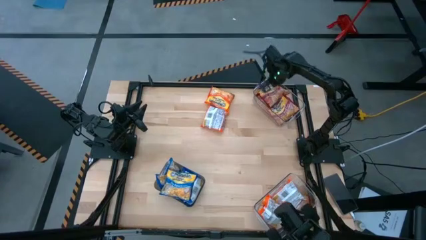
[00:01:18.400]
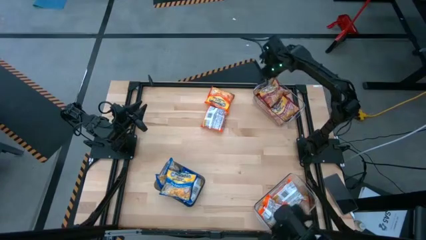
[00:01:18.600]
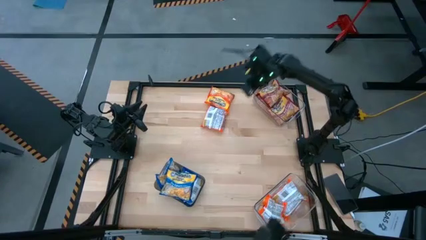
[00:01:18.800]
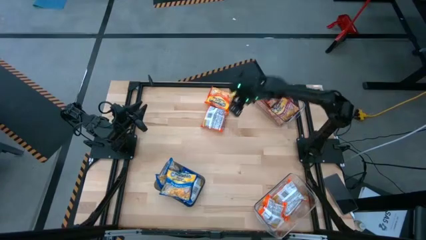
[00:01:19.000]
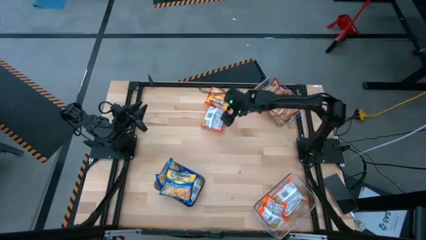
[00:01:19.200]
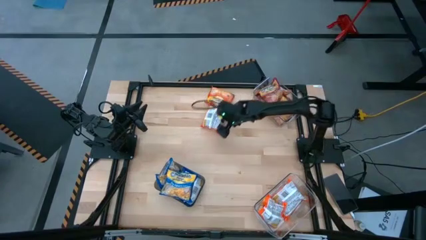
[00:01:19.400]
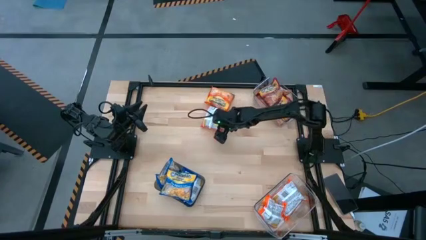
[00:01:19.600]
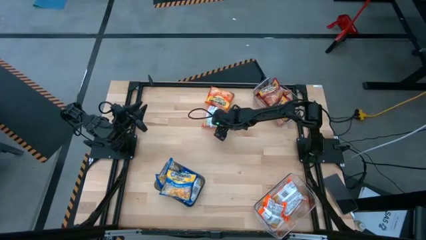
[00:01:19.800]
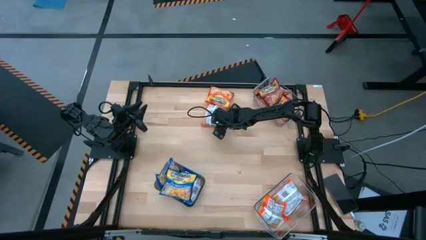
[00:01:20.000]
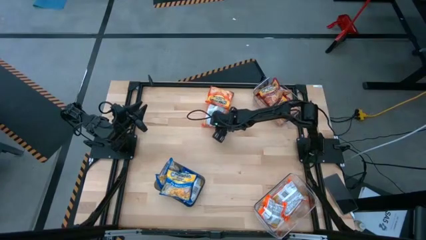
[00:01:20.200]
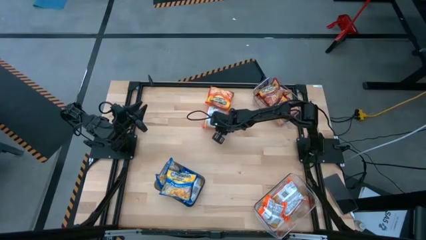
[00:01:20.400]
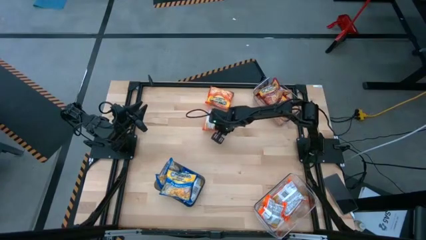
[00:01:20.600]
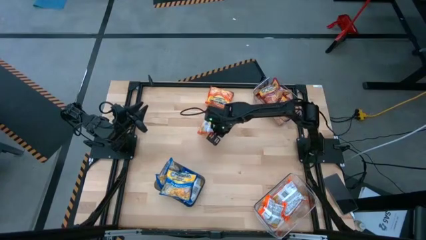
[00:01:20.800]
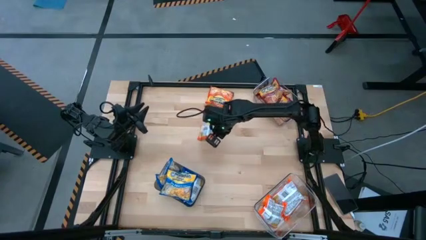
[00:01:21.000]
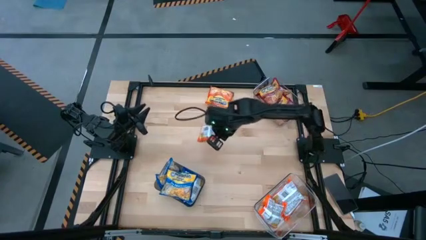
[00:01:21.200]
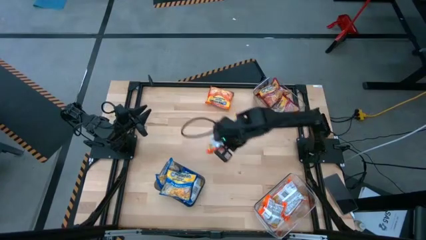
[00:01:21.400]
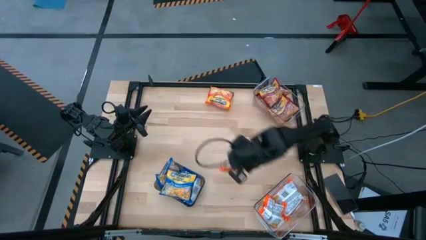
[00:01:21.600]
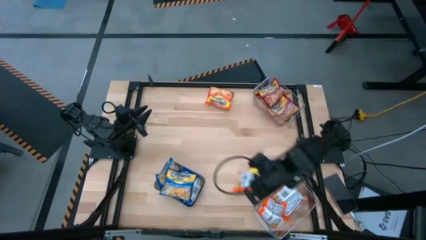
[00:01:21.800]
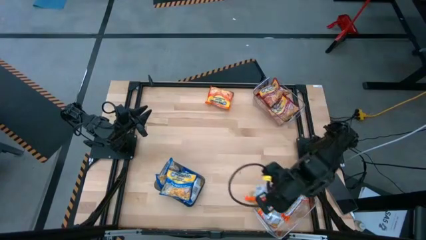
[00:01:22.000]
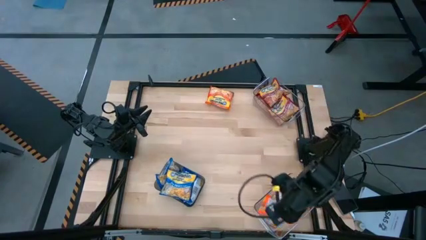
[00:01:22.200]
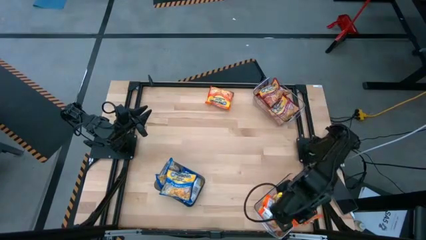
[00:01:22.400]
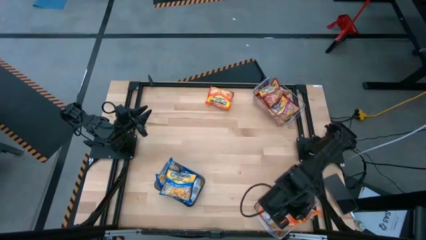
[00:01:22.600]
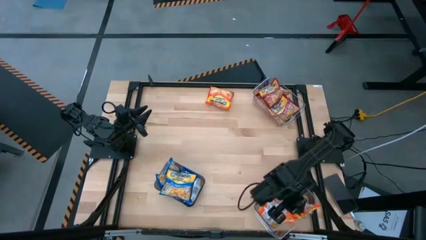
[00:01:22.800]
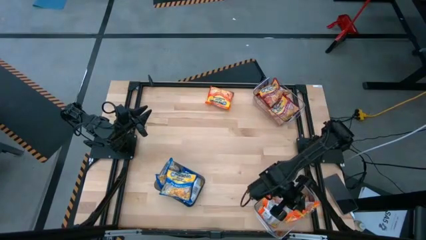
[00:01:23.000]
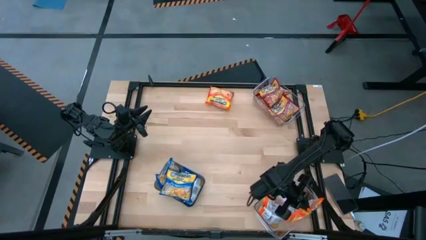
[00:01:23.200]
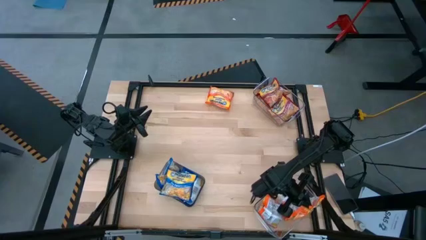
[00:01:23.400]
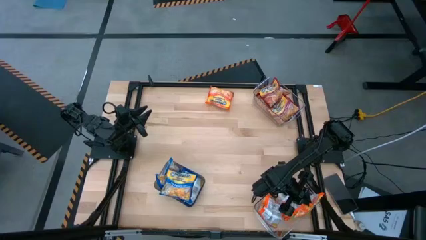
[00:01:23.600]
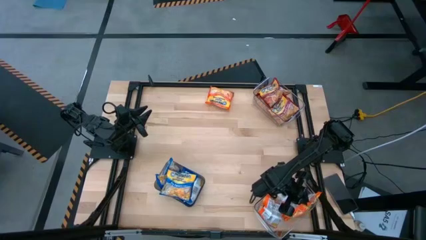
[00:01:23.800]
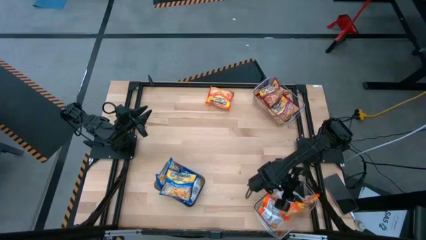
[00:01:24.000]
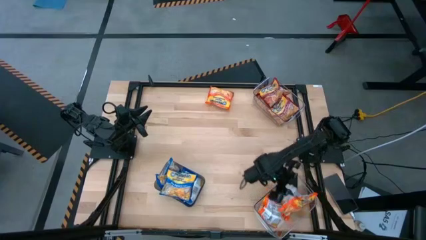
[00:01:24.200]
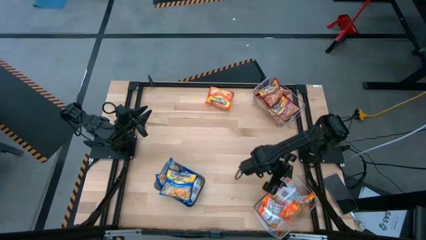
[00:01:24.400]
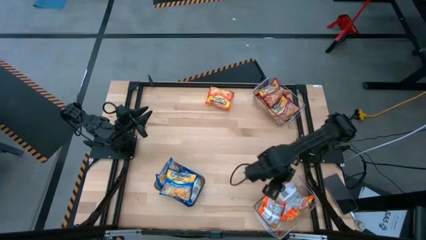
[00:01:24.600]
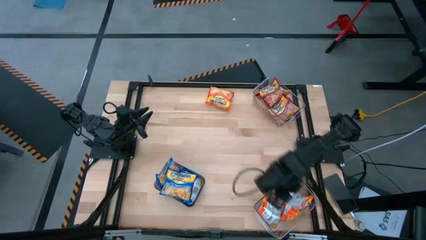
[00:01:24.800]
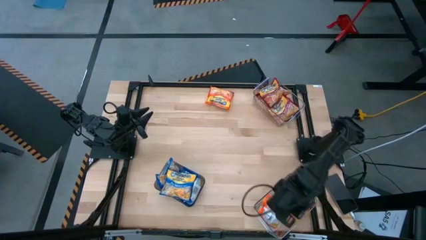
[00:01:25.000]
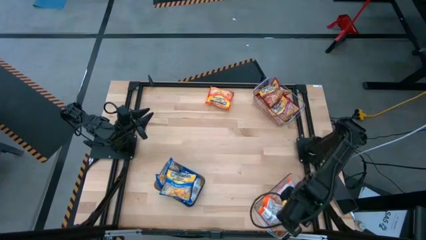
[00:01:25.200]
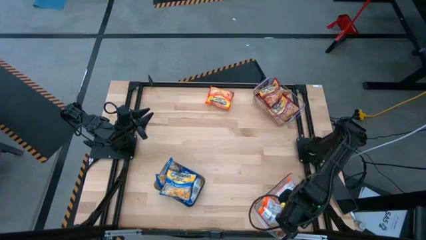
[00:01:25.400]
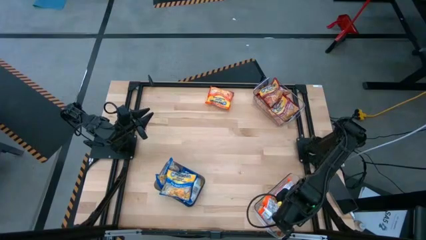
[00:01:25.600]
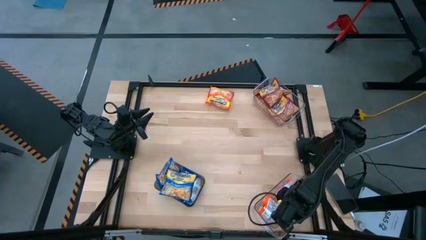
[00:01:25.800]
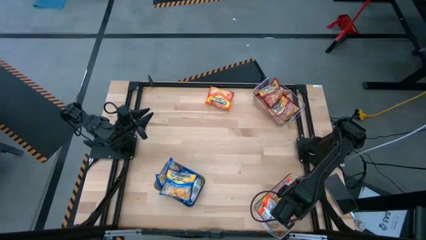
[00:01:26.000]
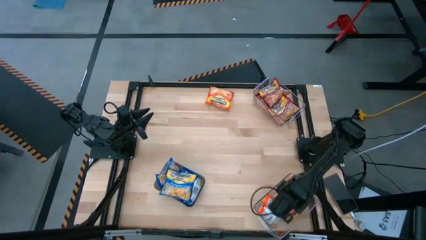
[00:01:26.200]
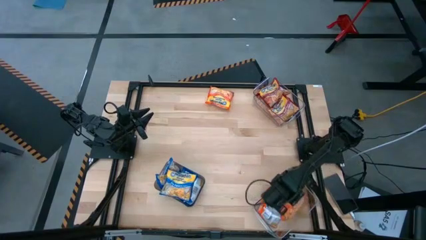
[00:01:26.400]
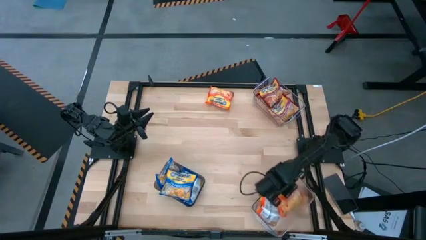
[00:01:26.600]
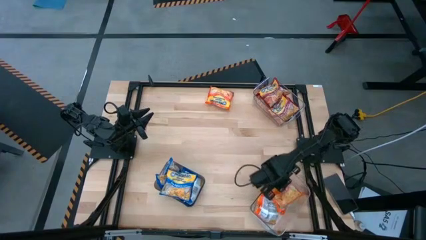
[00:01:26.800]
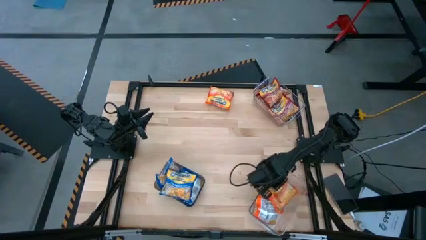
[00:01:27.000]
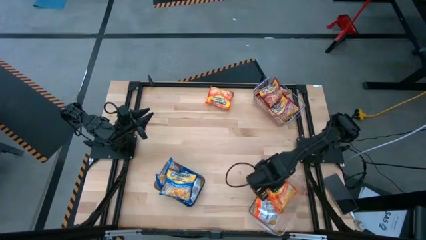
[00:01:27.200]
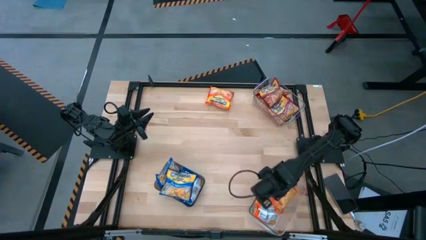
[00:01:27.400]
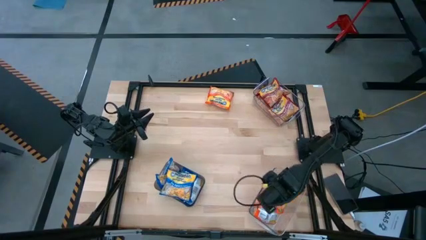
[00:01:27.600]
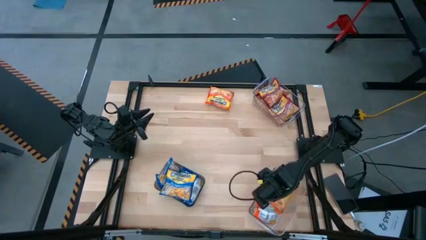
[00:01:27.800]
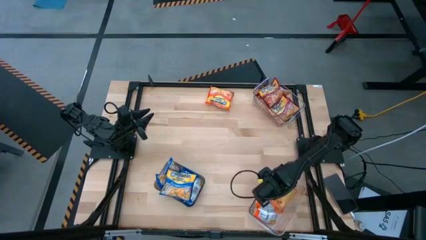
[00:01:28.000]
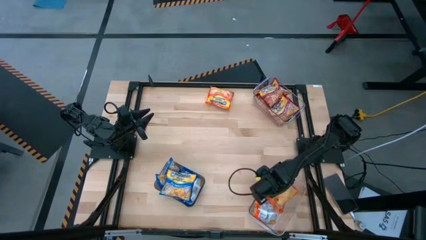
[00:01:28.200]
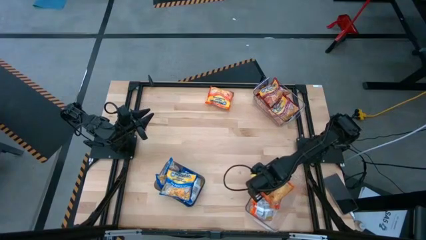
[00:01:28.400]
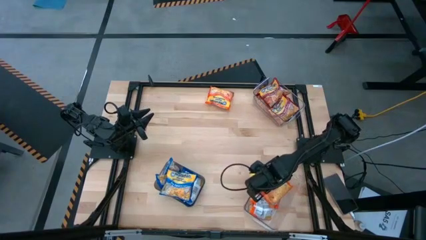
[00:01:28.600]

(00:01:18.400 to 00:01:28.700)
Task: Sort Maruchan noodles
Put the orange noodle pack into the bottom transparent bin

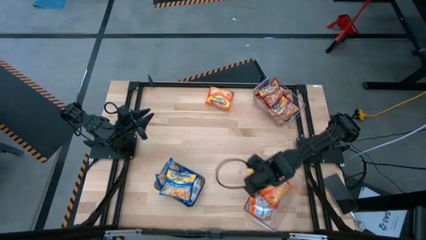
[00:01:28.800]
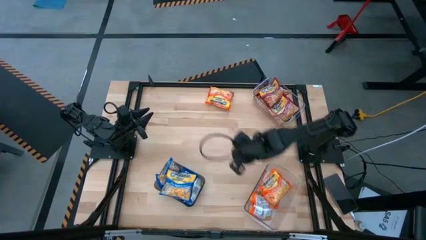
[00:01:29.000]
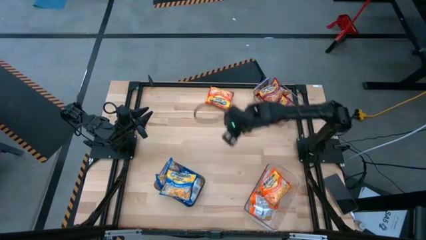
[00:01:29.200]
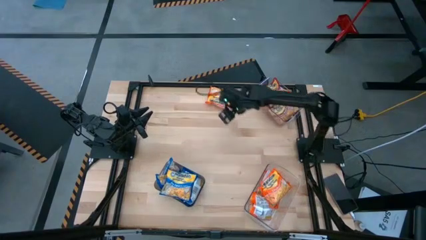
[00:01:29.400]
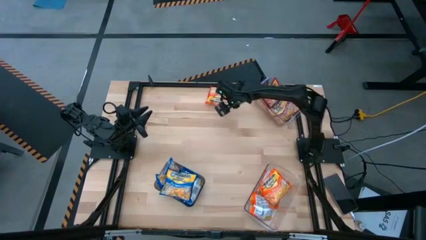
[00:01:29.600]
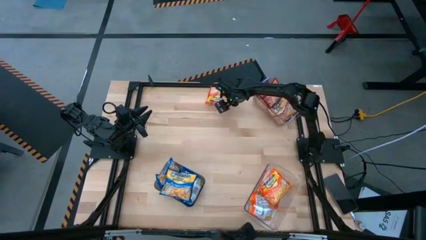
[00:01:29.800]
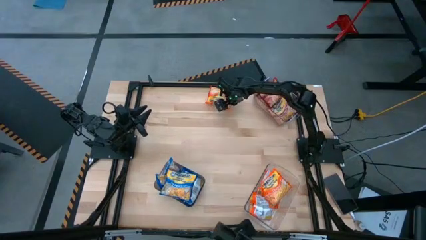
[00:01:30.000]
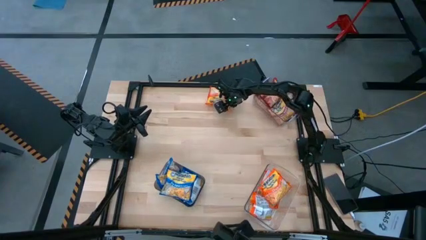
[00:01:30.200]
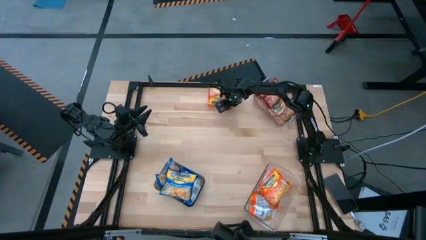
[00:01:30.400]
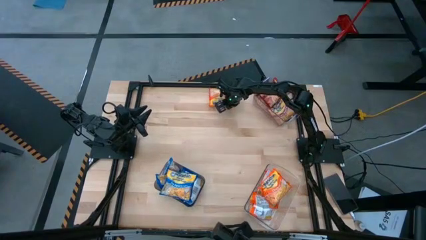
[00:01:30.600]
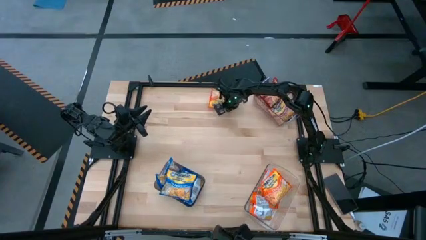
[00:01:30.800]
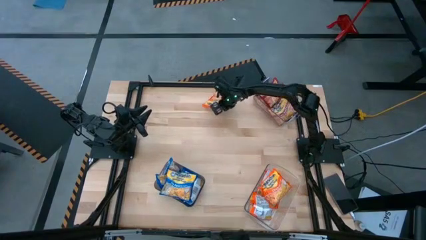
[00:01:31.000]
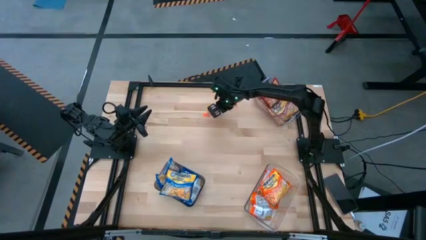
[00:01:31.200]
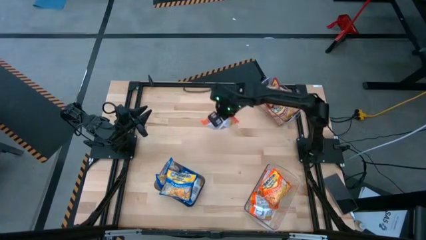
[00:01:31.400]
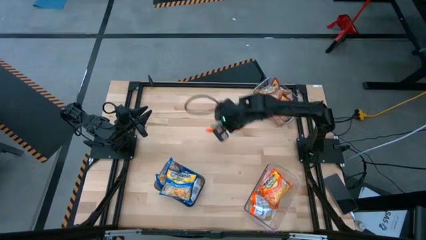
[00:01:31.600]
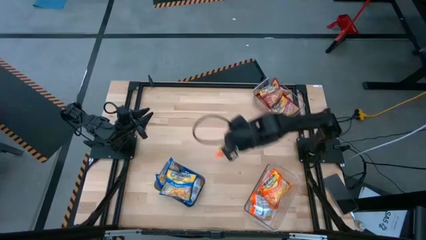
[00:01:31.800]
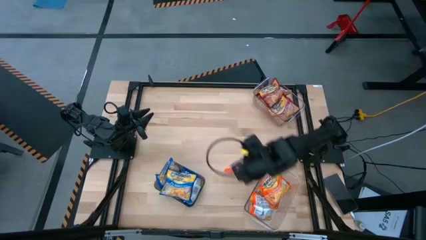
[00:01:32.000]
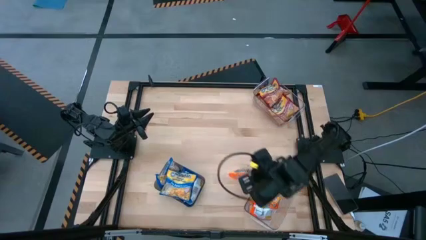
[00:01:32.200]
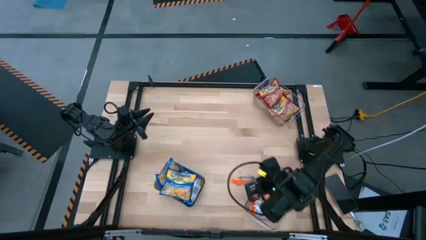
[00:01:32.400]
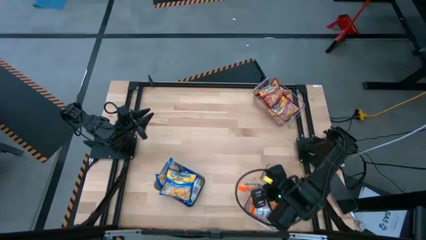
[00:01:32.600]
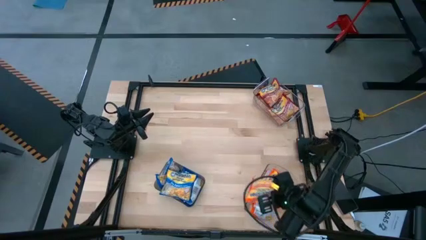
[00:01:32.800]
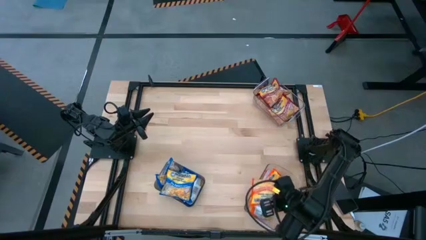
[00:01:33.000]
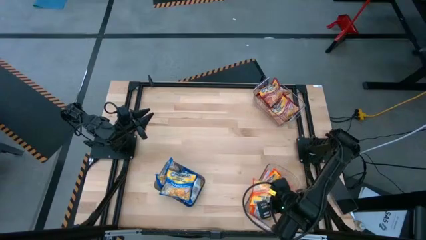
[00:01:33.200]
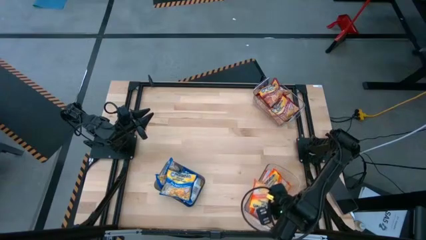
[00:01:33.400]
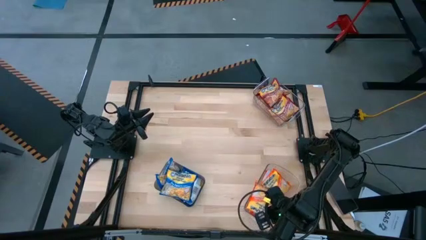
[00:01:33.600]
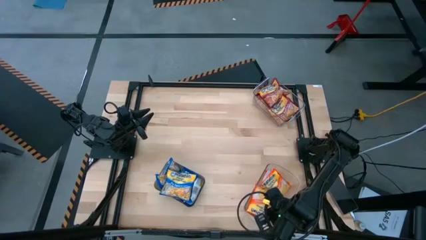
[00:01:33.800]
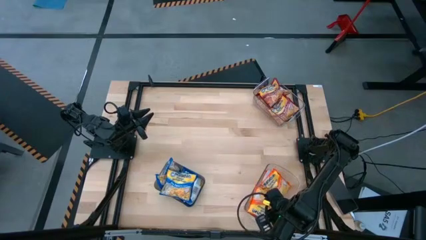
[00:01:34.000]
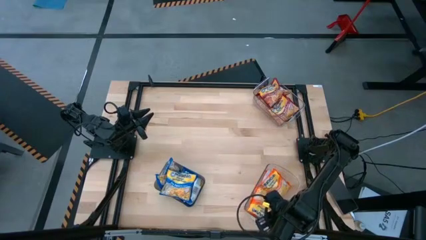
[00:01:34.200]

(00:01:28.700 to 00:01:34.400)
Put the orange noodle pack into the bottom transparent bin
